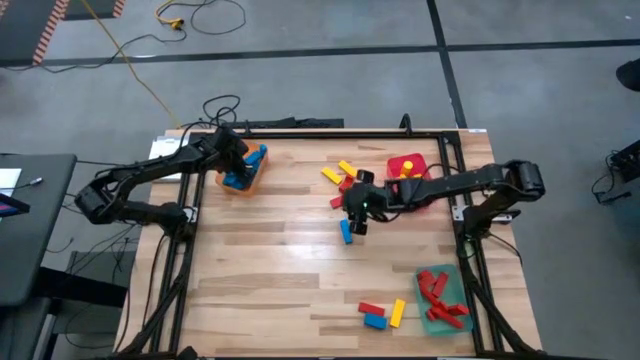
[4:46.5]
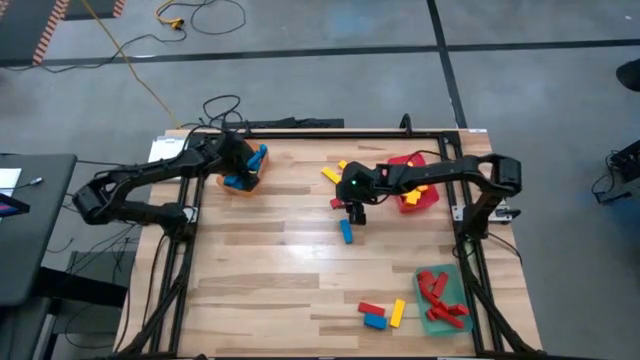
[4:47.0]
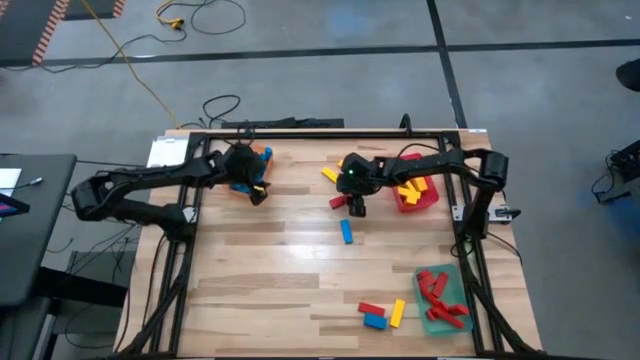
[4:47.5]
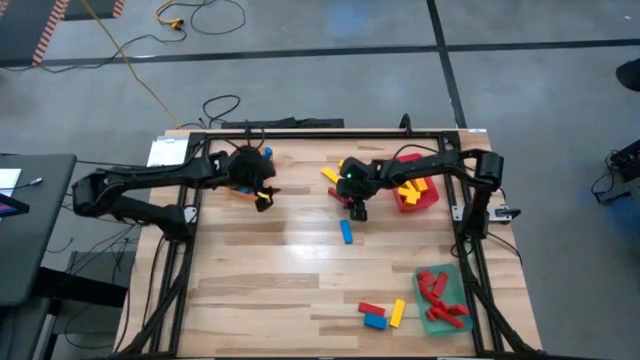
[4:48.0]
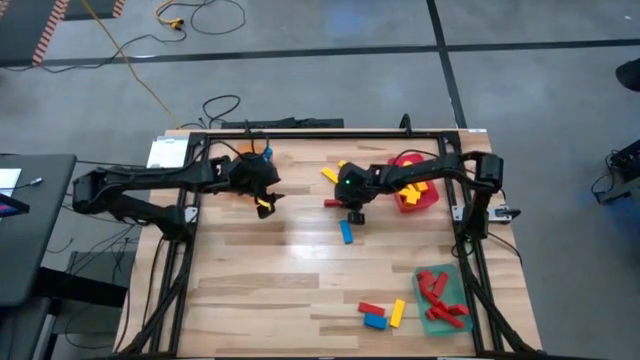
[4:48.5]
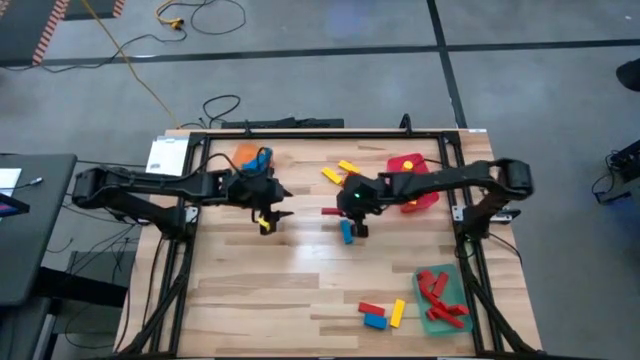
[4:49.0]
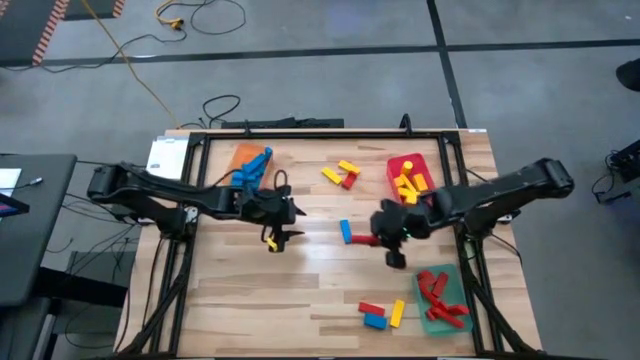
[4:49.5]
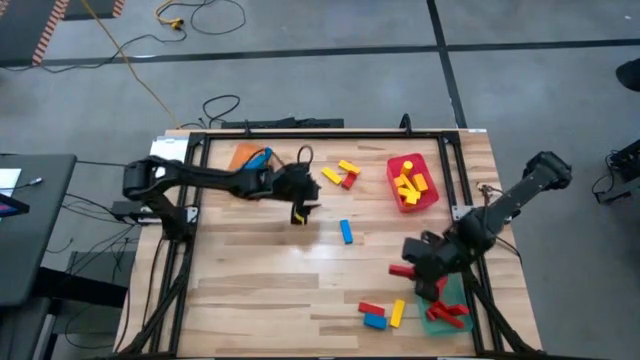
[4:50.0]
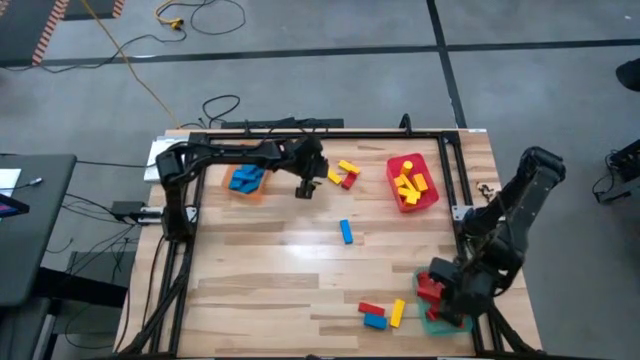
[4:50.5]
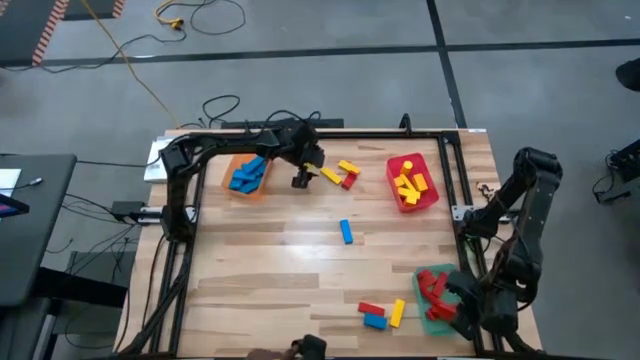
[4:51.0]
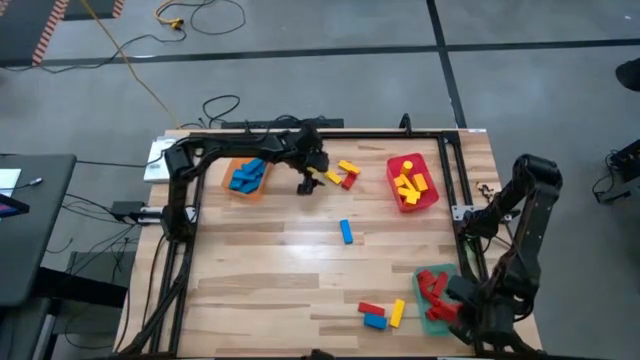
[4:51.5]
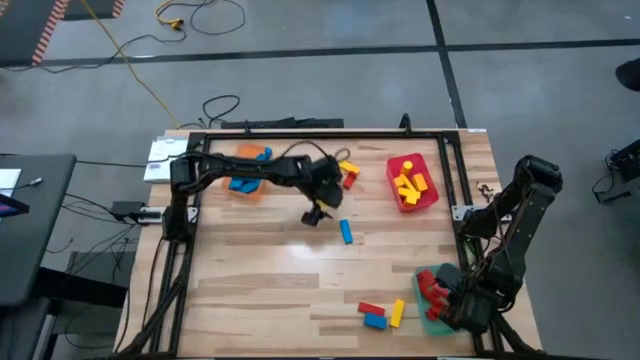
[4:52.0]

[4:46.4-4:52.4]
Task: Sort blocks
Put the red rectangle block into the green bin

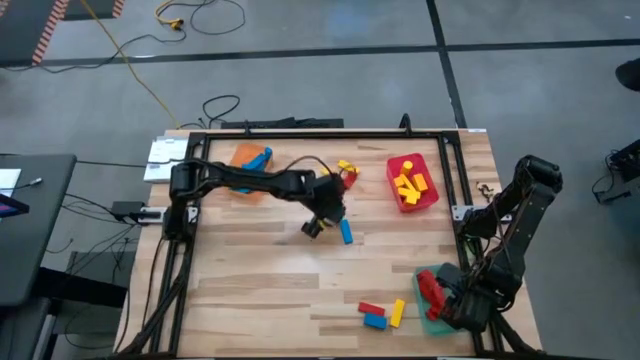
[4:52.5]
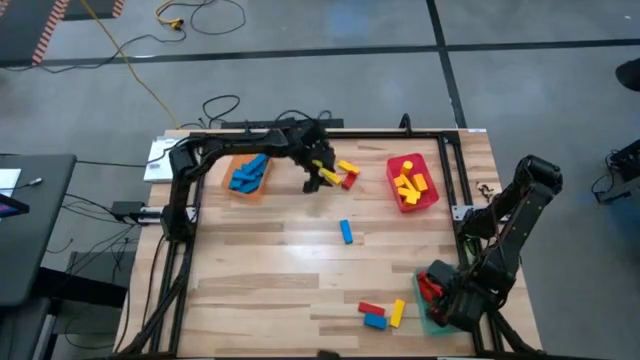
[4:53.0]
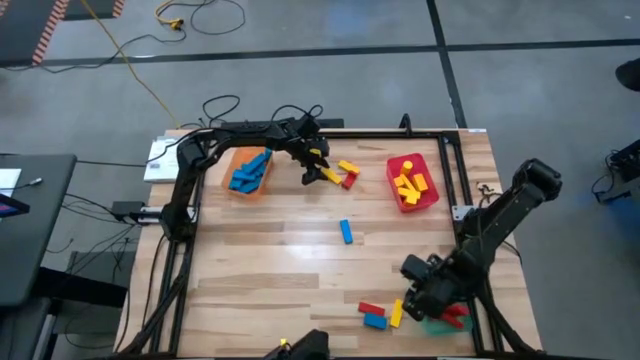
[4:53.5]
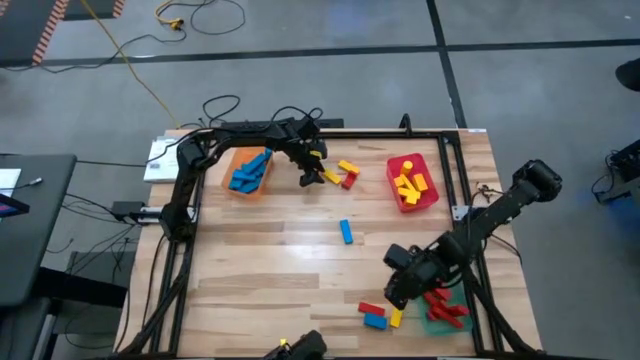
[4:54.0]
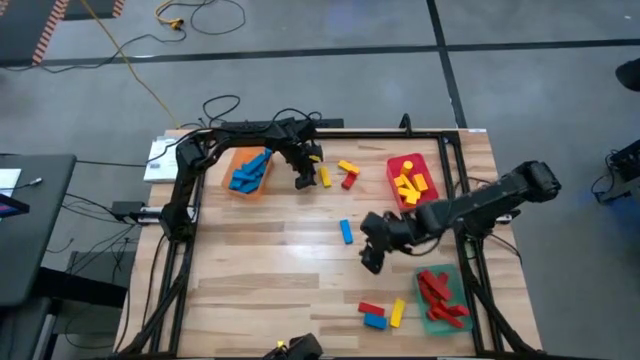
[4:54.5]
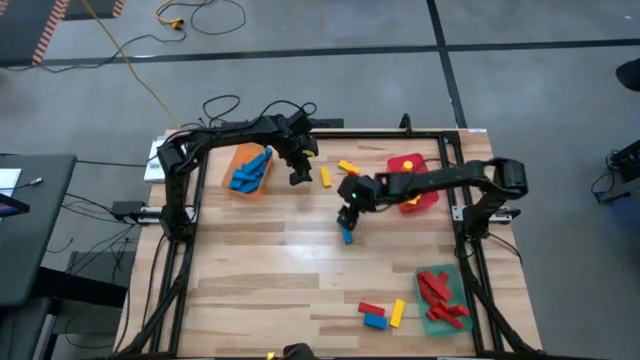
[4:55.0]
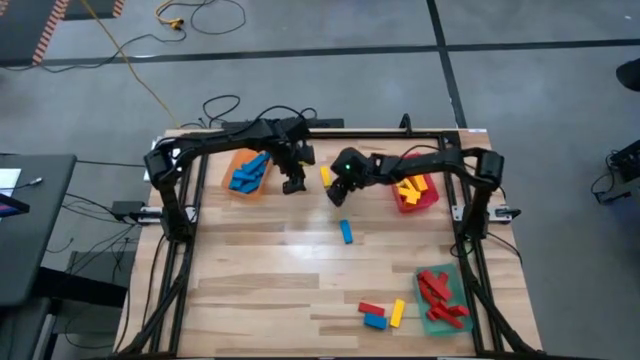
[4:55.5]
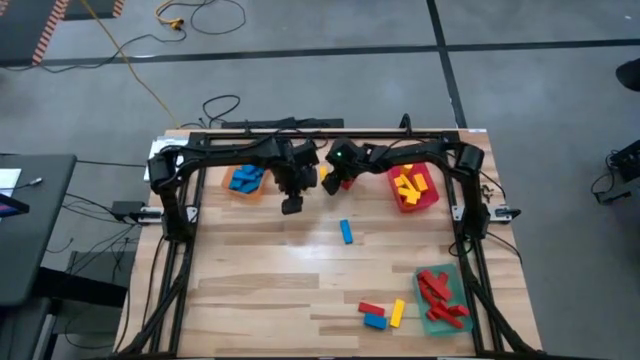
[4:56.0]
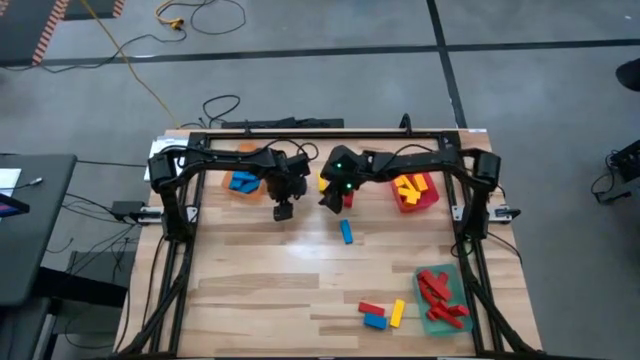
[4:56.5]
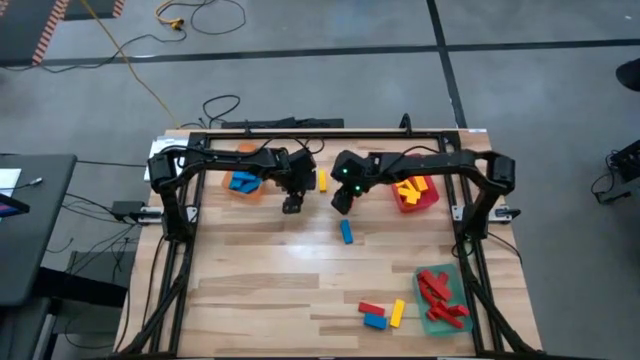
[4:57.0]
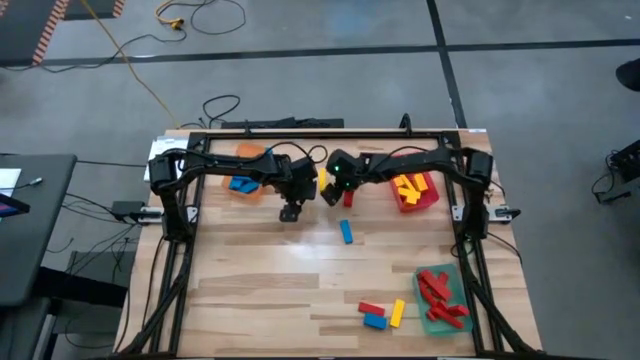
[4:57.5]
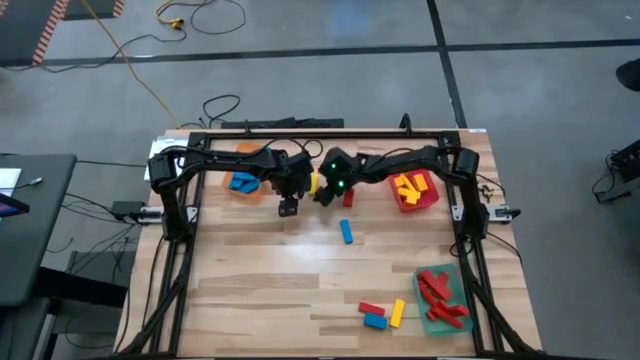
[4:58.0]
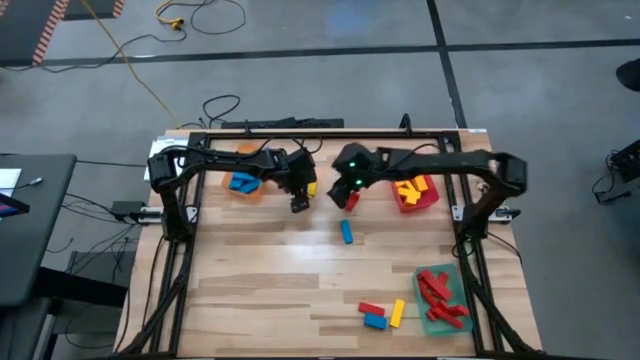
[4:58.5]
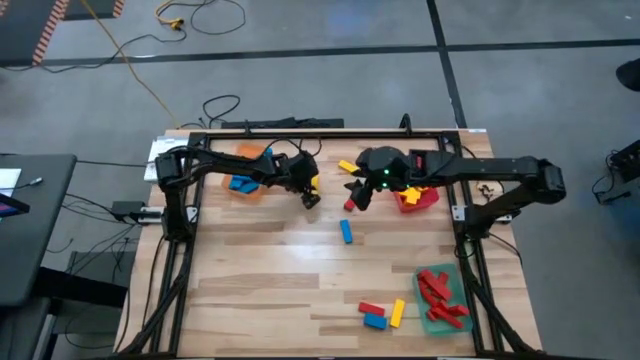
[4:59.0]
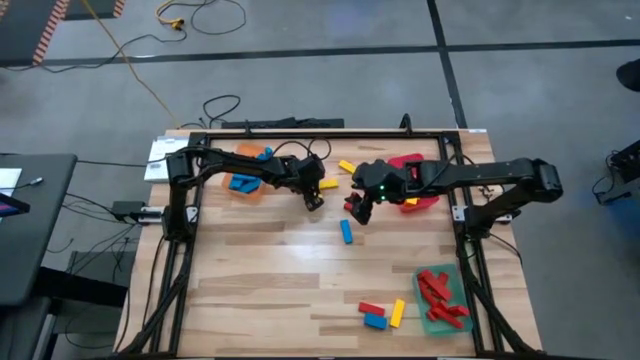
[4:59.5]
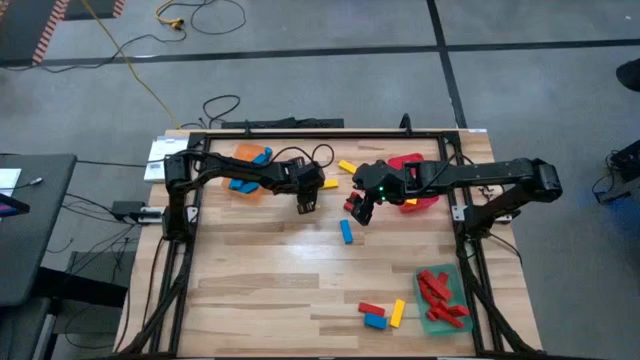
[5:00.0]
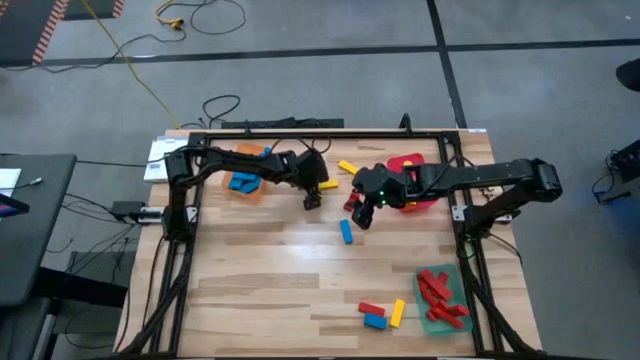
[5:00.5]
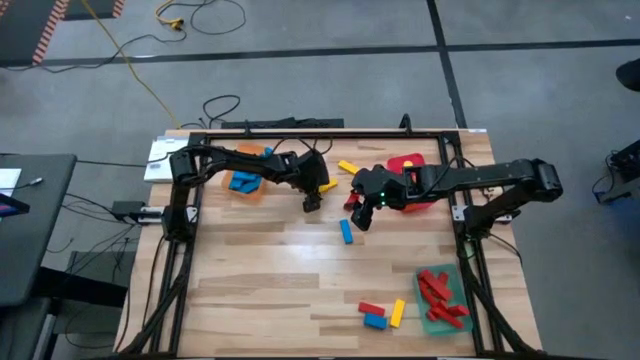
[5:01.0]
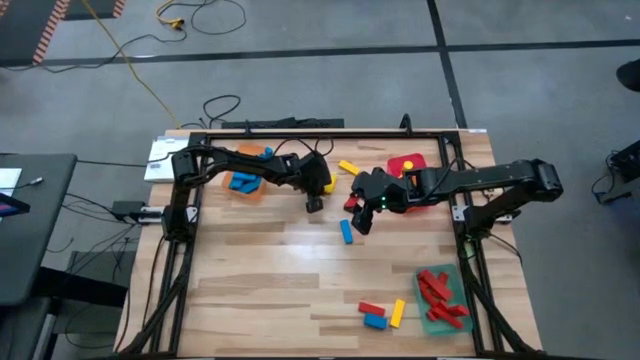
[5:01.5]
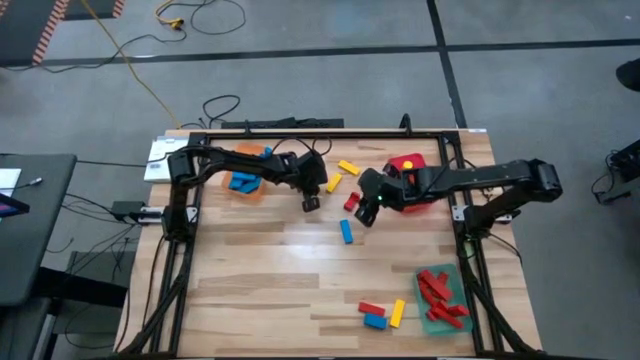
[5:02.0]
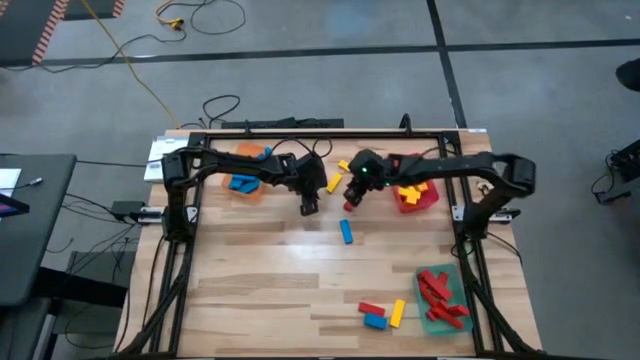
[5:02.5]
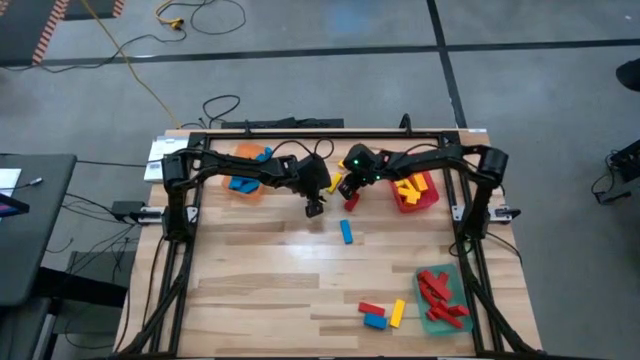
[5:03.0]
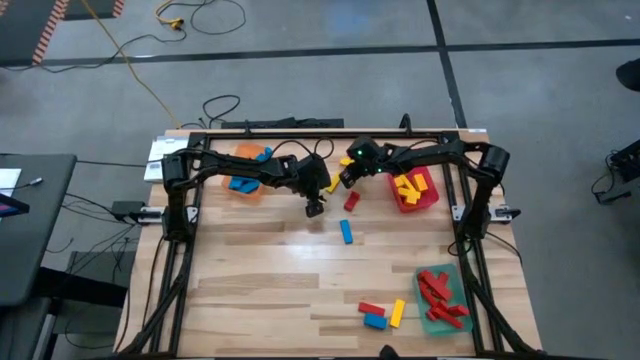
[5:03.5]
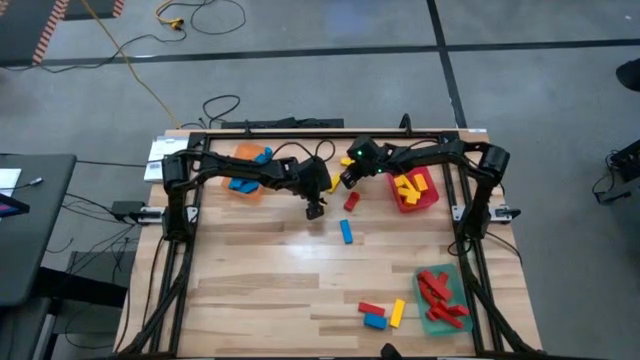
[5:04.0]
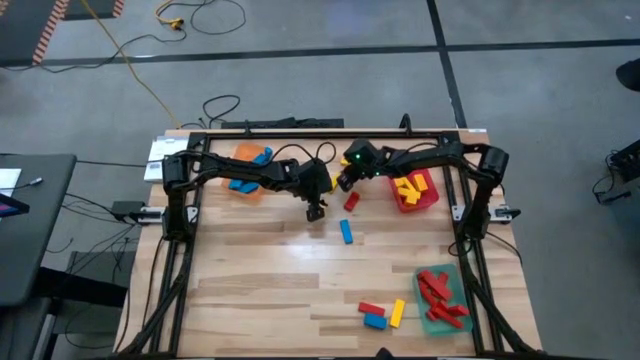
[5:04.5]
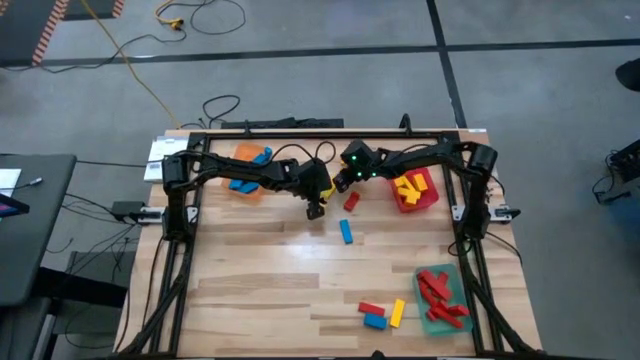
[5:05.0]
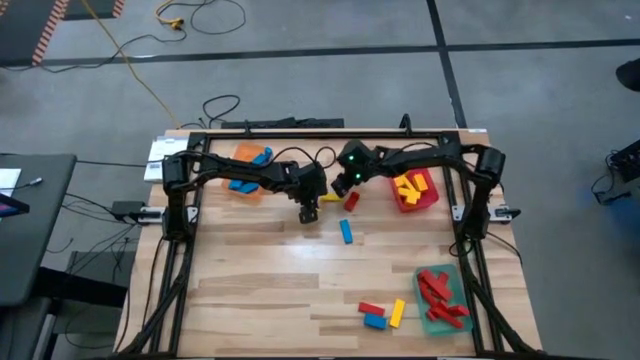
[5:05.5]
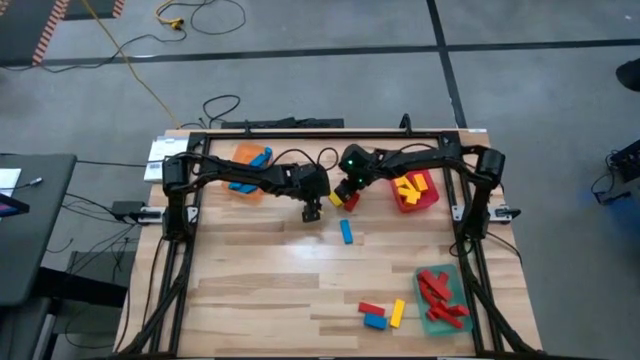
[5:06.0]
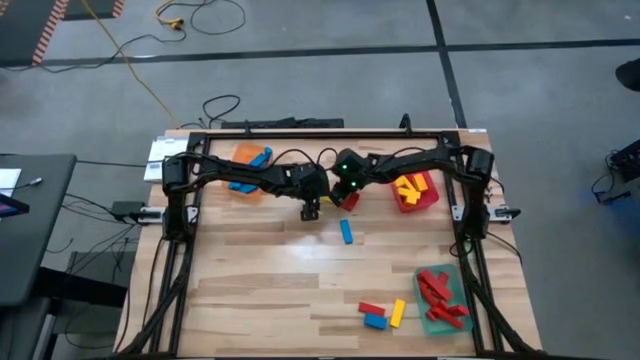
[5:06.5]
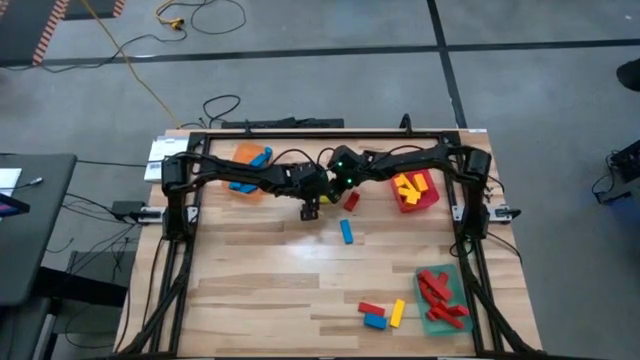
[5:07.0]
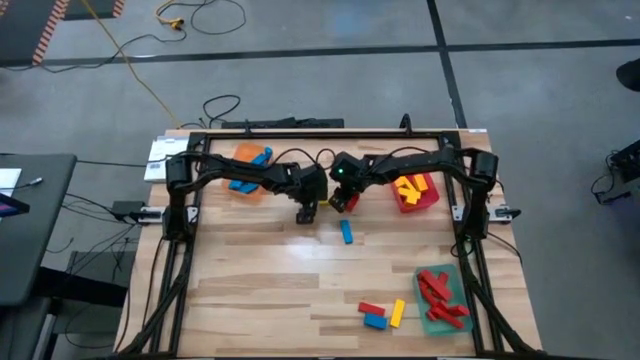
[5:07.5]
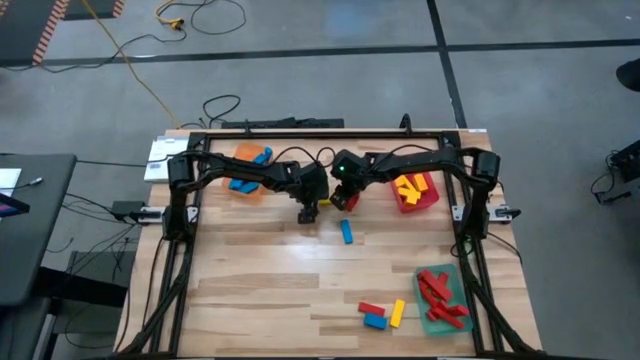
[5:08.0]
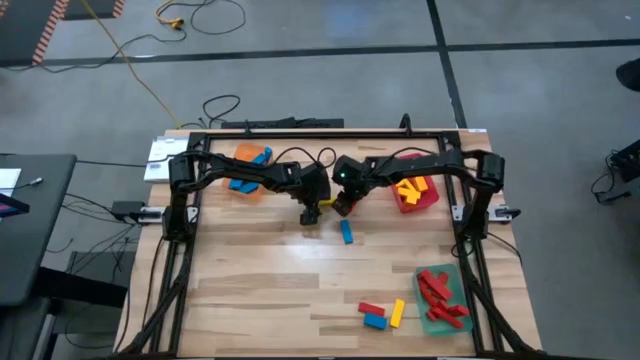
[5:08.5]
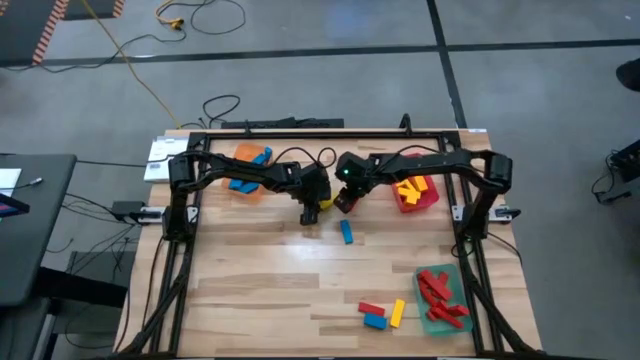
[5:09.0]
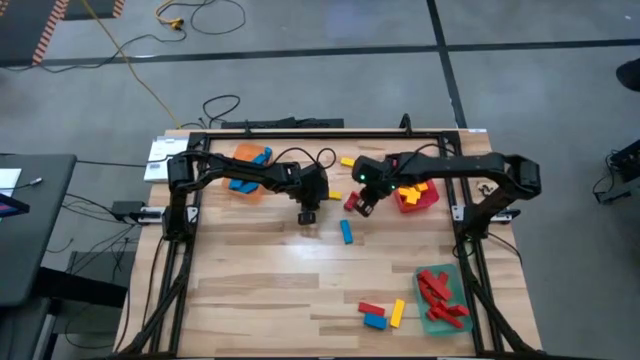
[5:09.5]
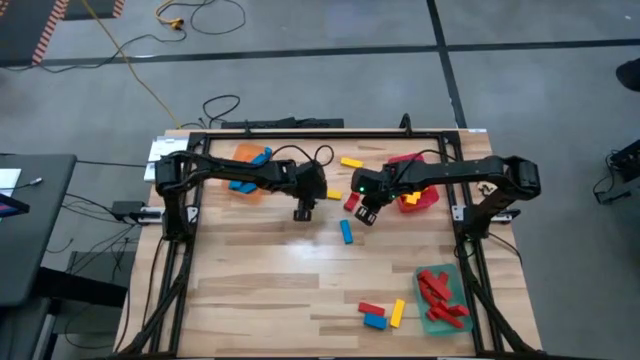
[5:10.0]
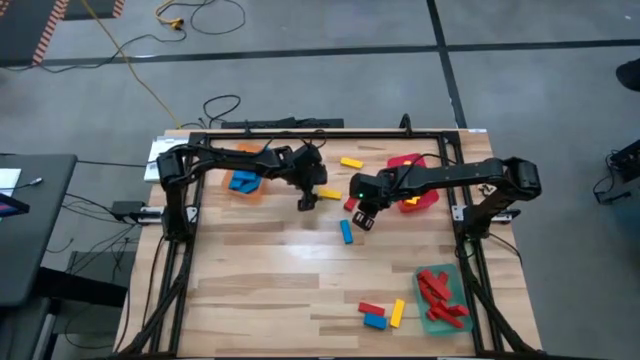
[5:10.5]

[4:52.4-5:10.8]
Put the yellow rectangle block into the red bin
